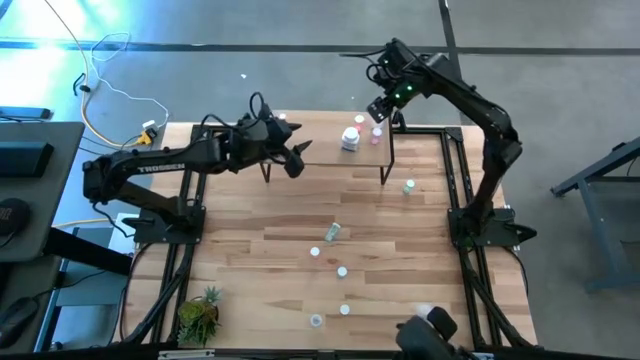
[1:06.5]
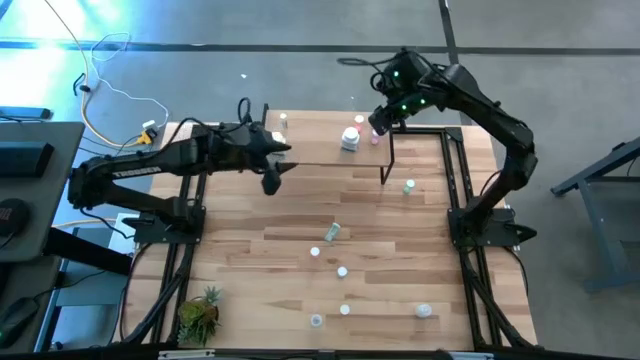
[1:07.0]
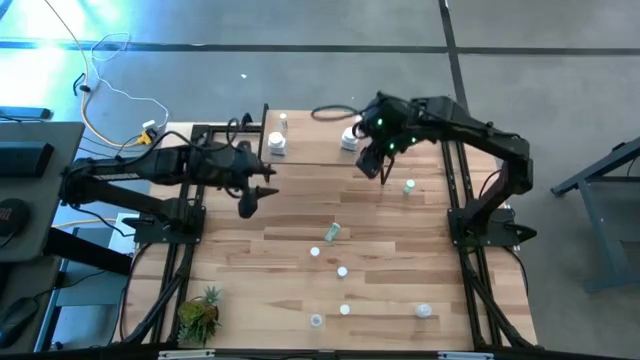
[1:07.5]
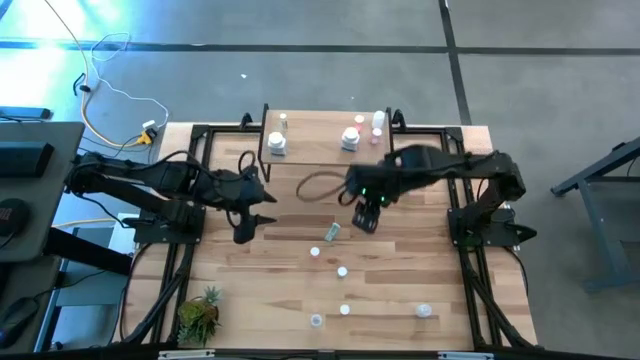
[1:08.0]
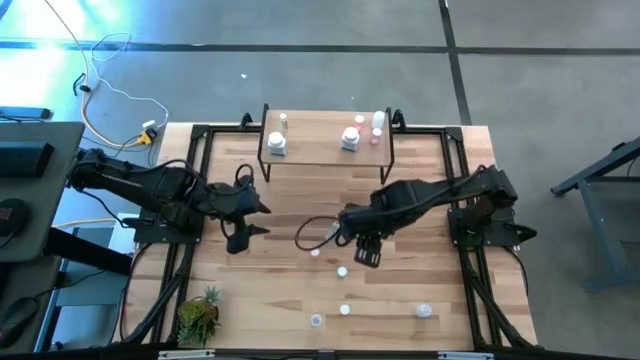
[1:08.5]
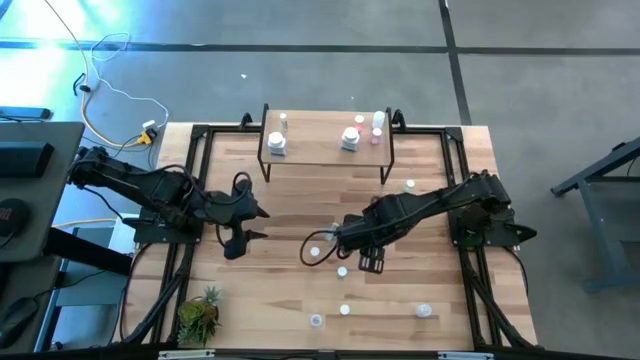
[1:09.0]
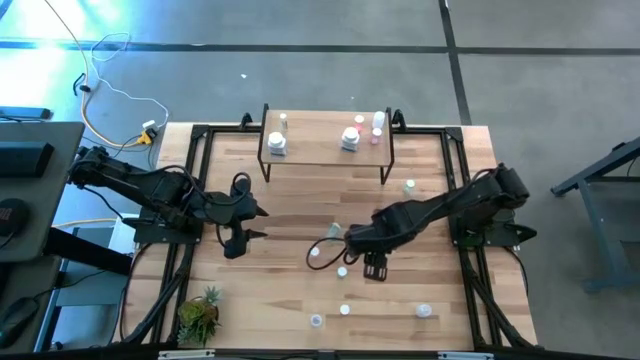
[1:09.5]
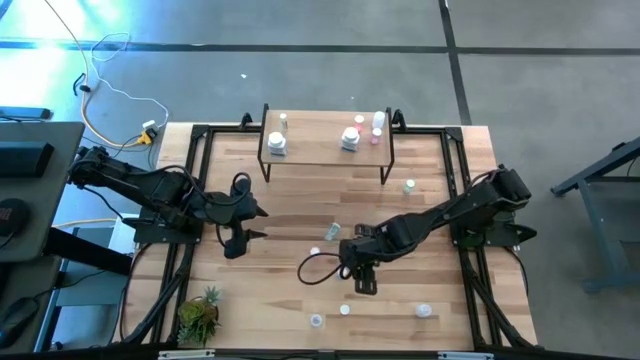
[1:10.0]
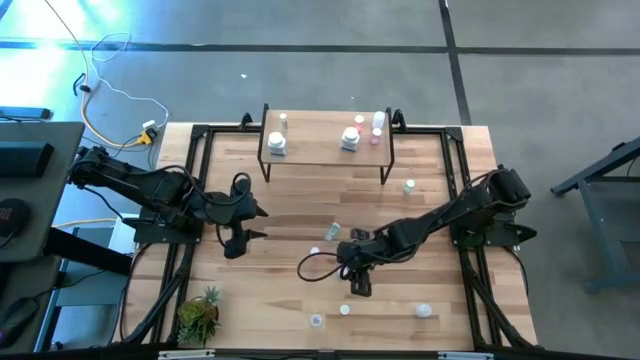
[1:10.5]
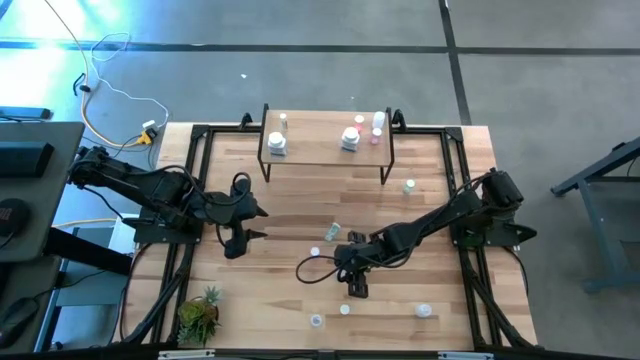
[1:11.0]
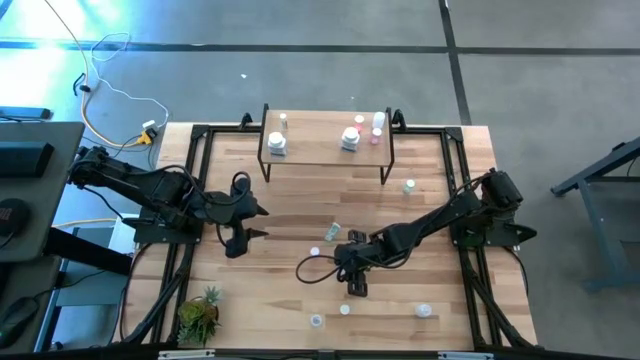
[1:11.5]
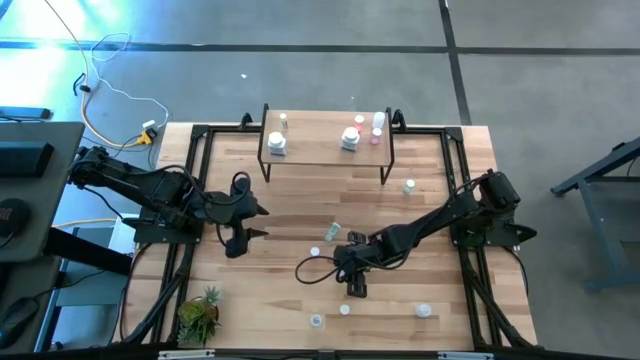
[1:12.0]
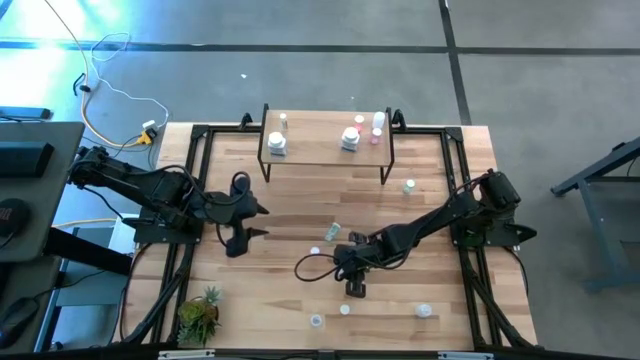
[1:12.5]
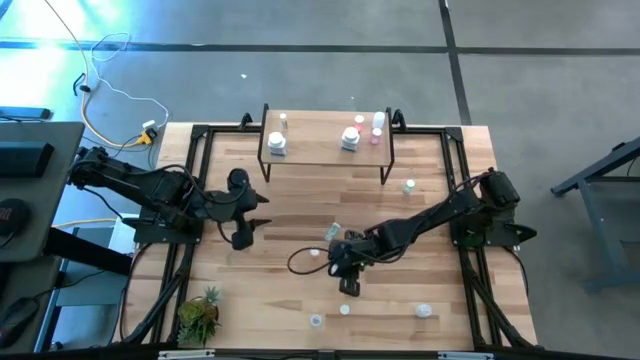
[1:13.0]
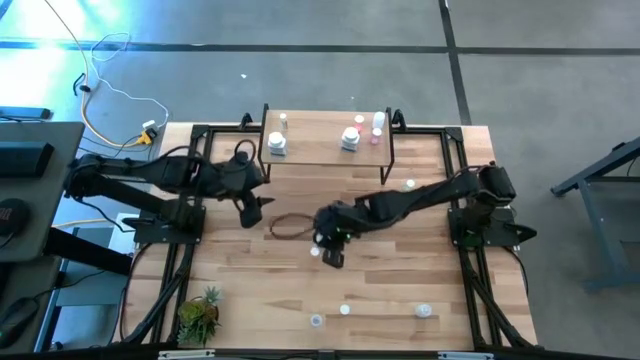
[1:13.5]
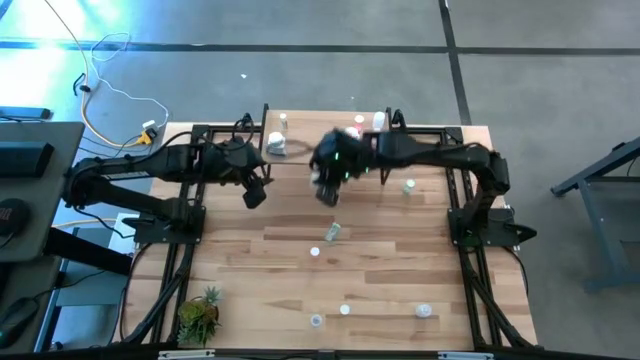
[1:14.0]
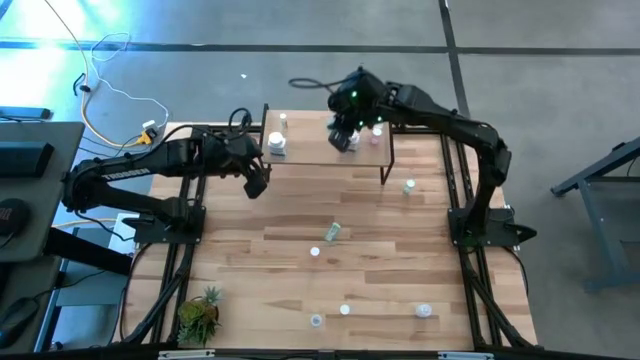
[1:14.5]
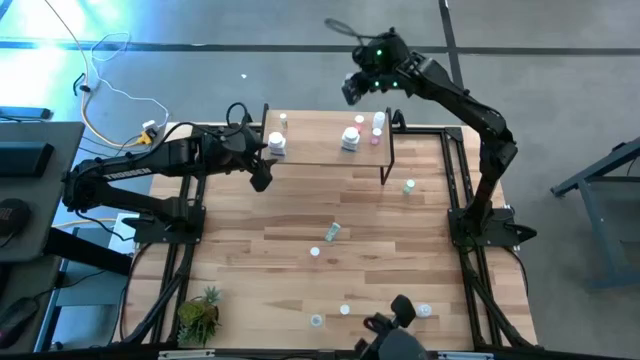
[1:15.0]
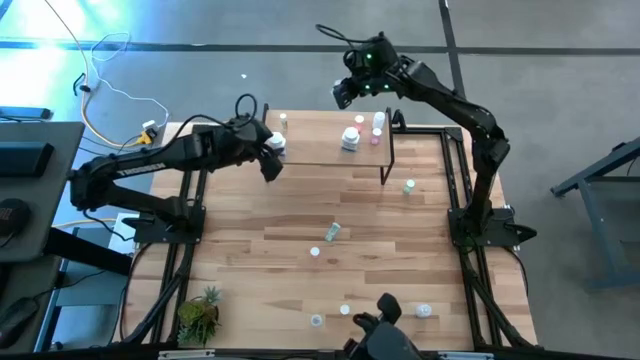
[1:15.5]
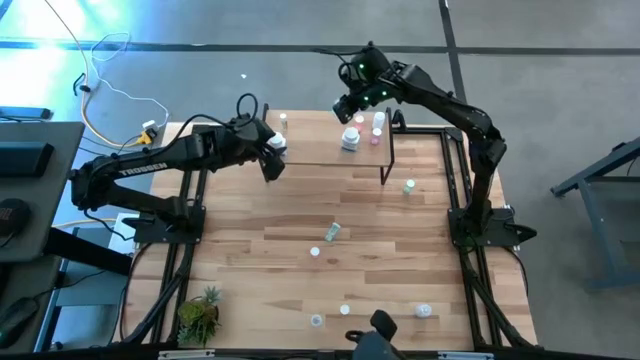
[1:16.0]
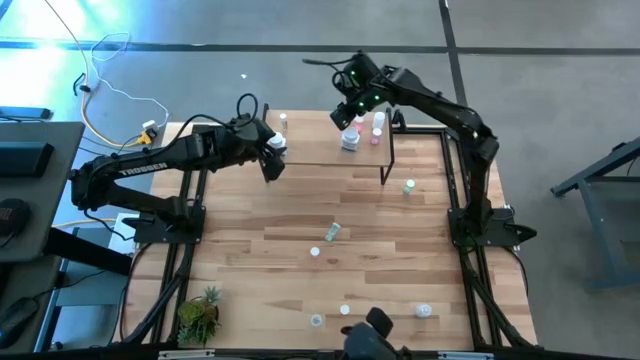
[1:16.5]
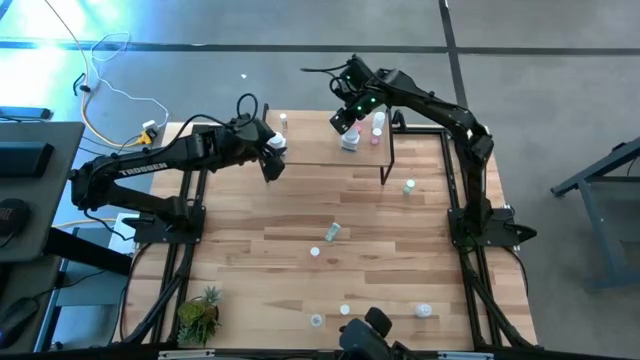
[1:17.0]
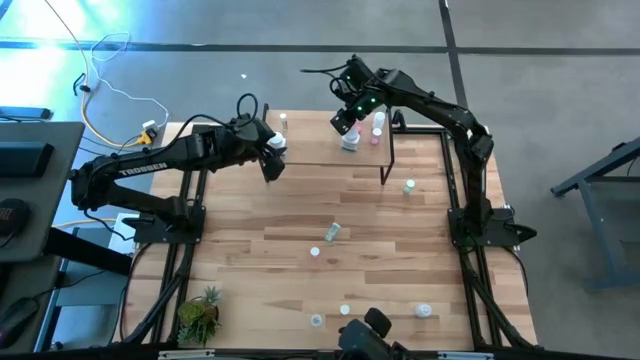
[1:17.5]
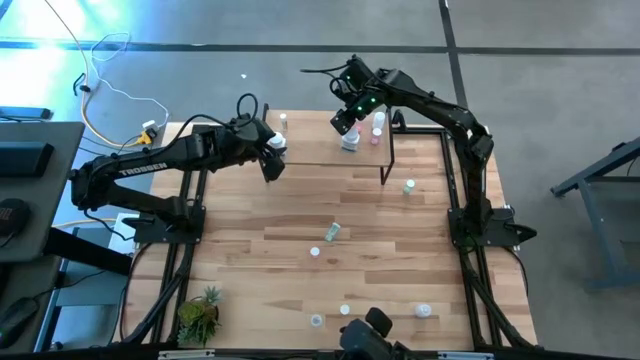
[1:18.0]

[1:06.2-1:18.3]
Task: Pick and place medicine bottles onto shelf by color
Put the bottom blue pill bottle on the shelf

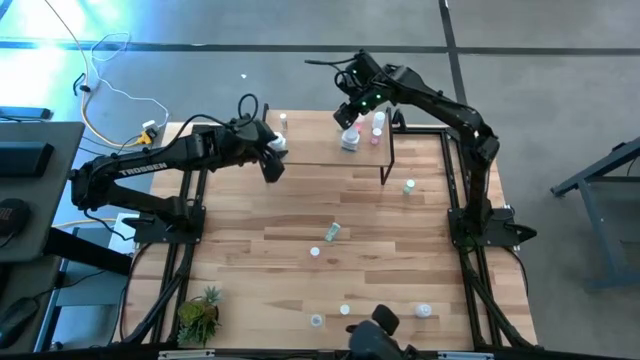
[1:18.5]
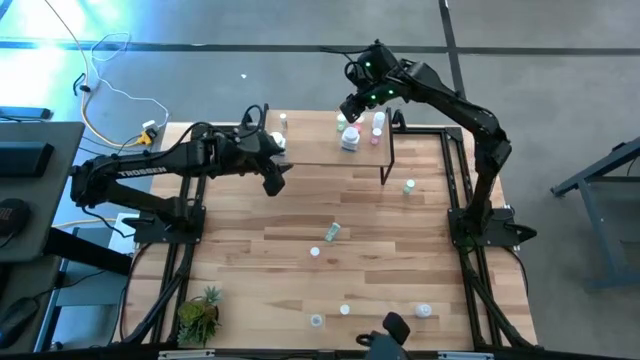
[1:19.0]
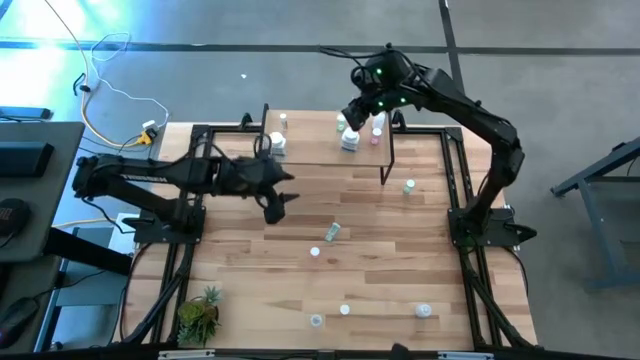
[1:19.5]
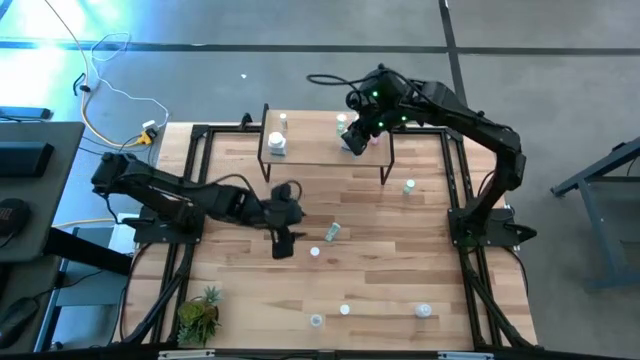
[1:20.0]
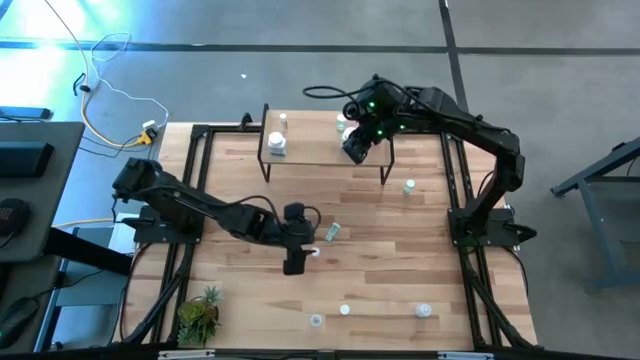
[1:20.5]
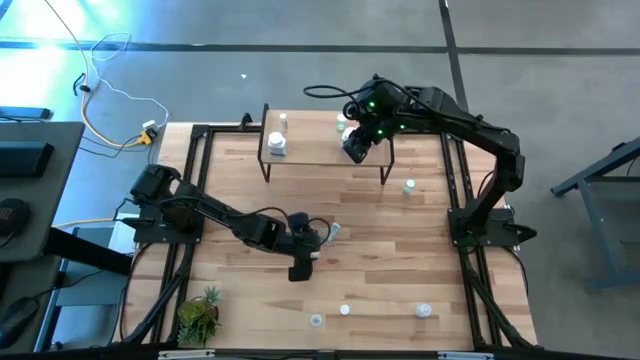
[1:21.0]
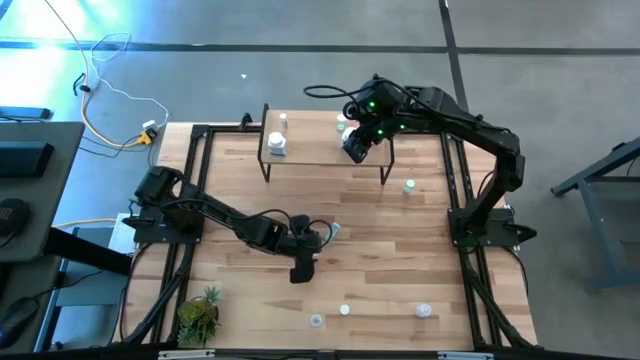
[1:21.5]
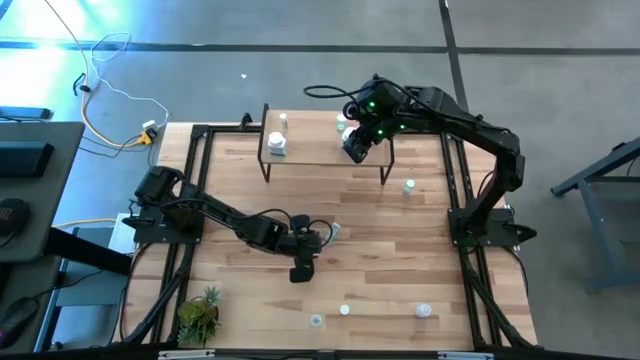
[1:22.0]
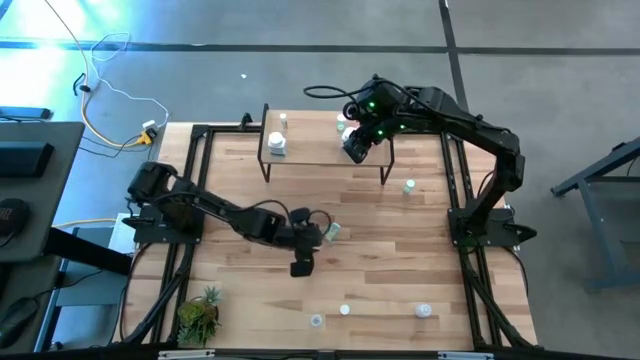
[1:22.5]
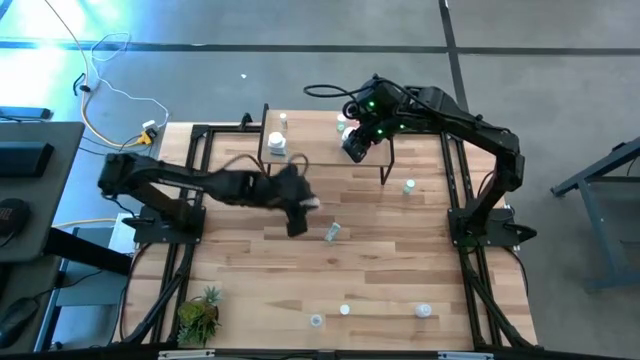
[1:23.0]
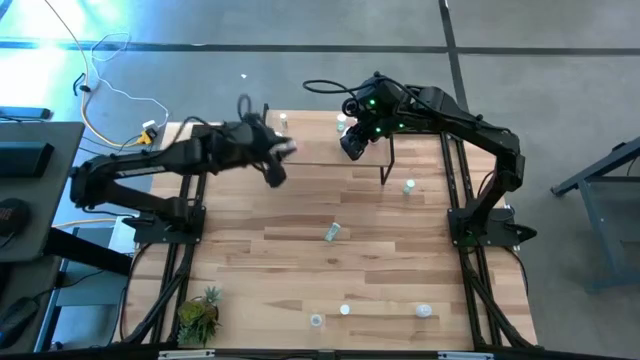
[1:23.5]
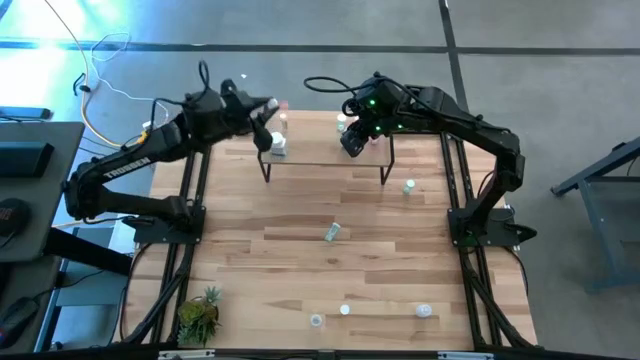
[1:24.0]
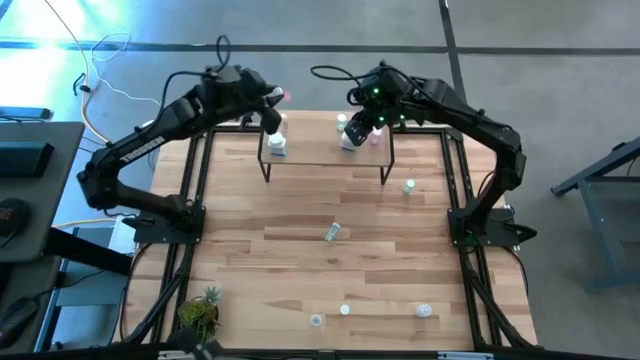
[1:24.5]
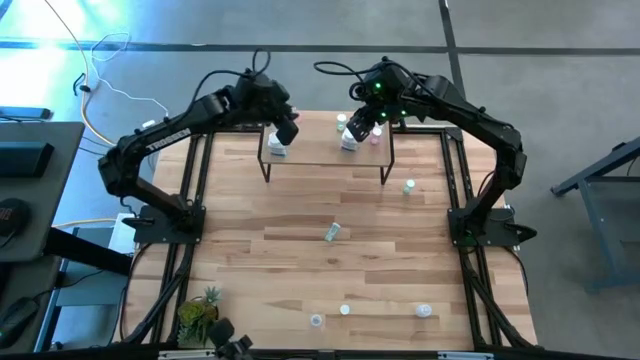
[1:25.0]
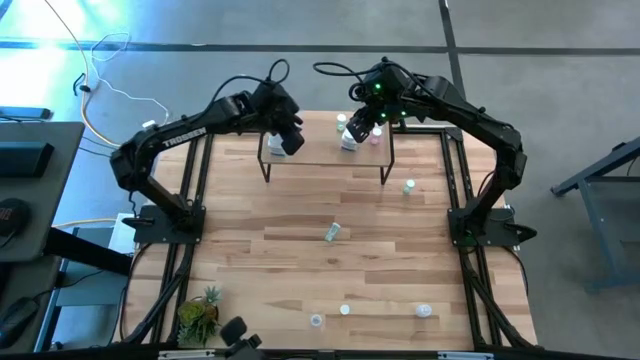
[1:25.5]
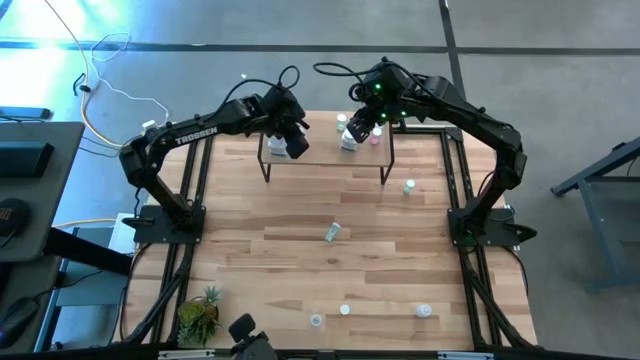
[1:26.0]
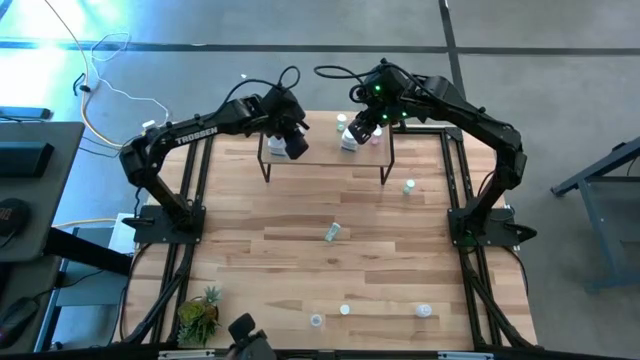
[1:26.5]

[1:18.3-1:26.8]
Put the pink pill bottle on the shelf
